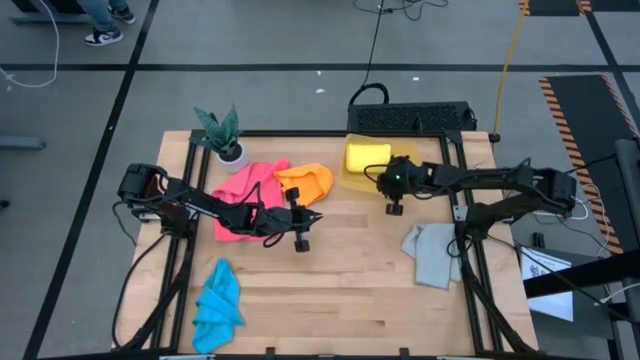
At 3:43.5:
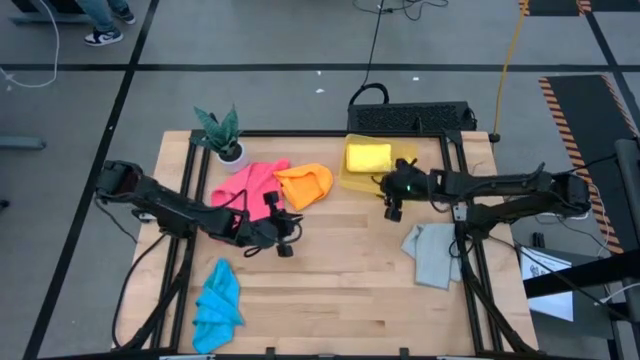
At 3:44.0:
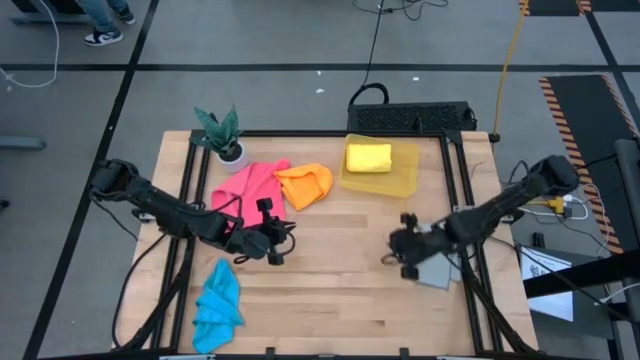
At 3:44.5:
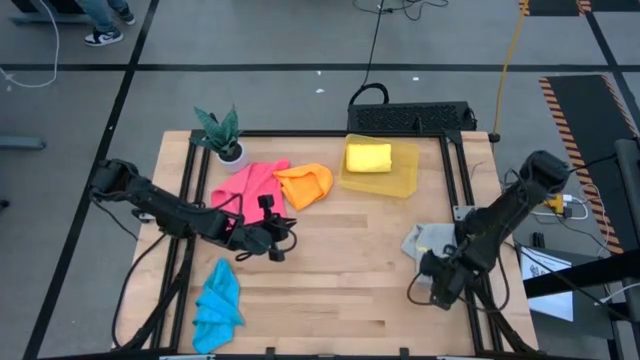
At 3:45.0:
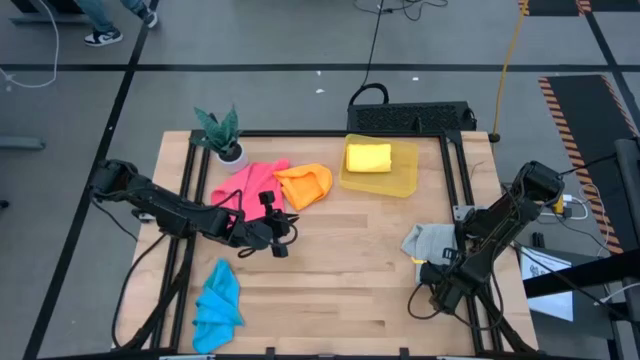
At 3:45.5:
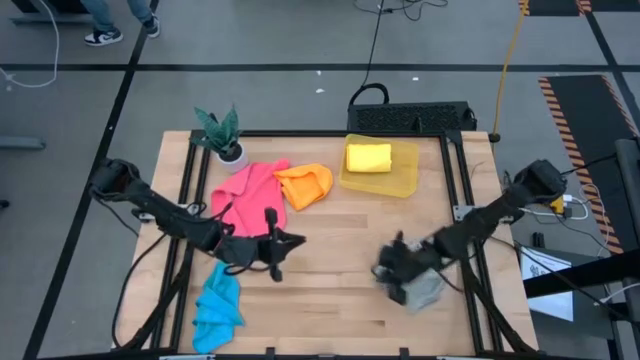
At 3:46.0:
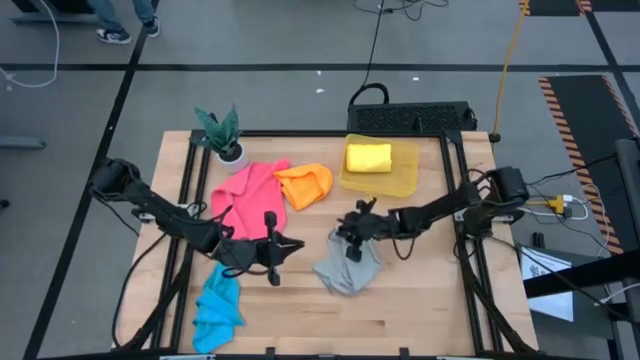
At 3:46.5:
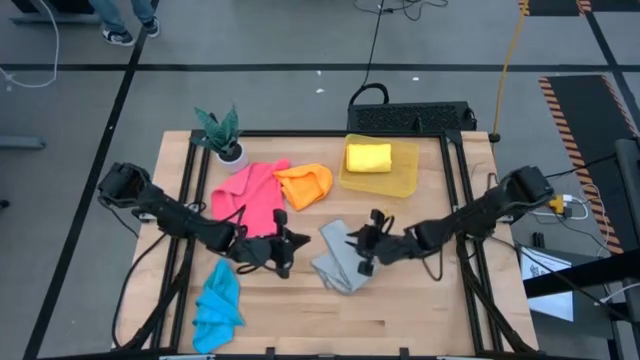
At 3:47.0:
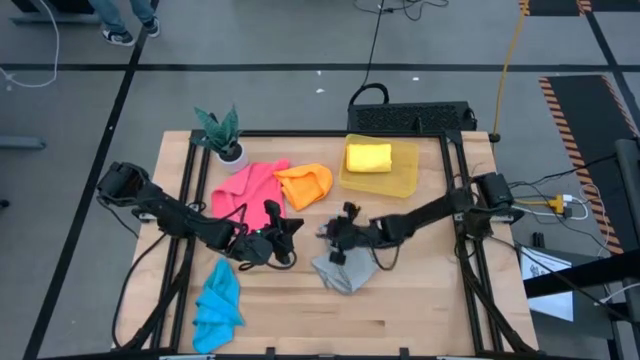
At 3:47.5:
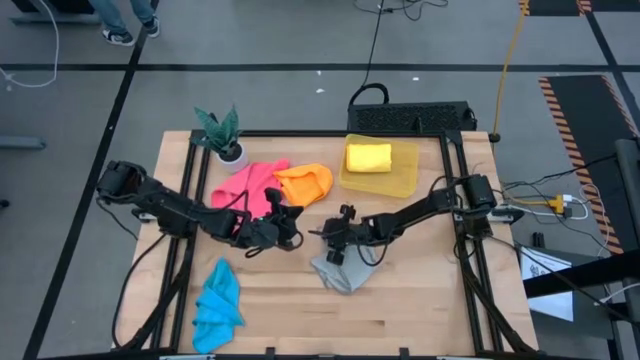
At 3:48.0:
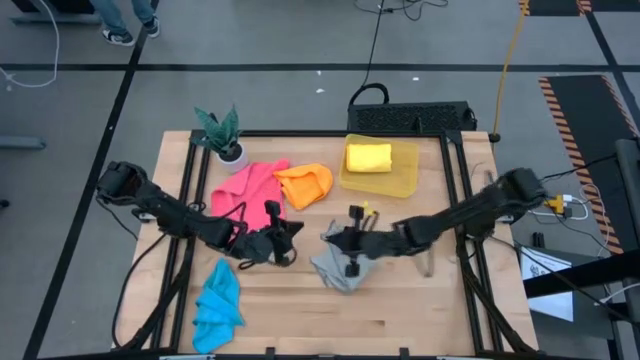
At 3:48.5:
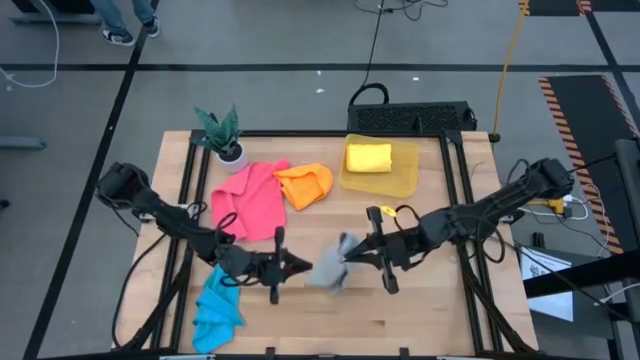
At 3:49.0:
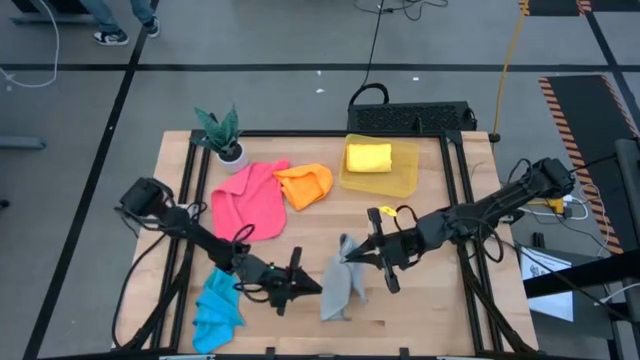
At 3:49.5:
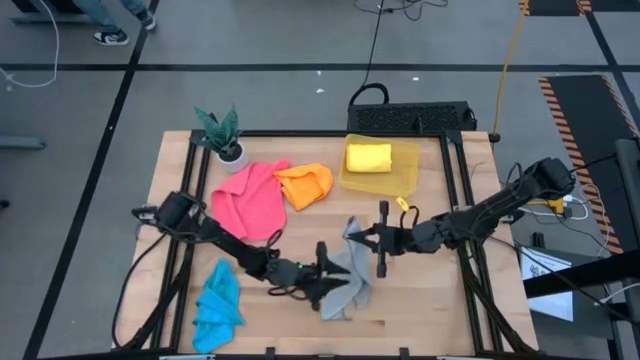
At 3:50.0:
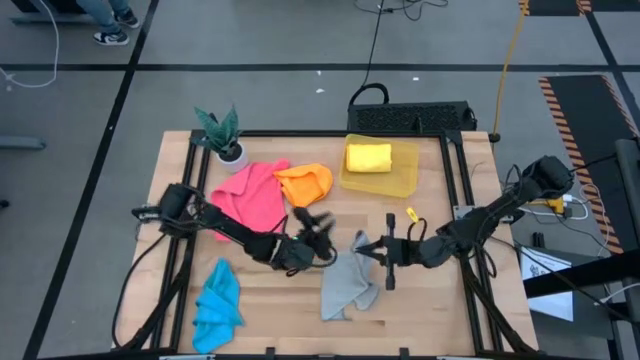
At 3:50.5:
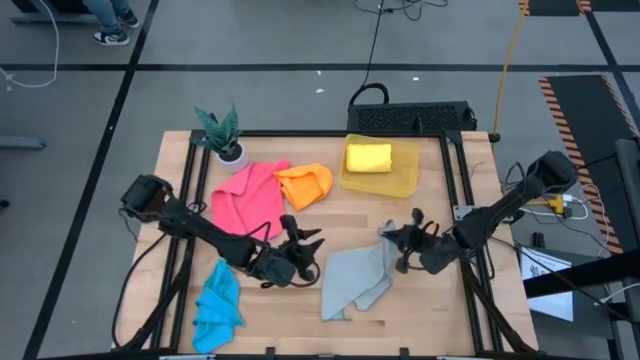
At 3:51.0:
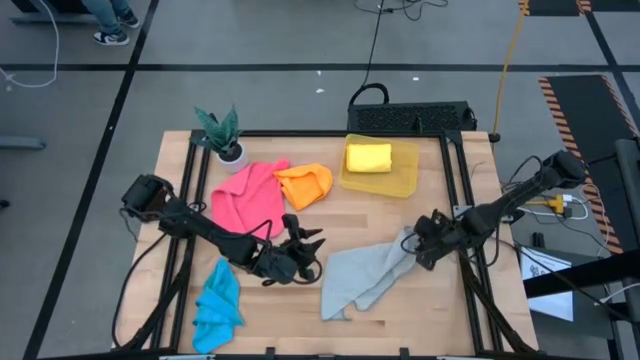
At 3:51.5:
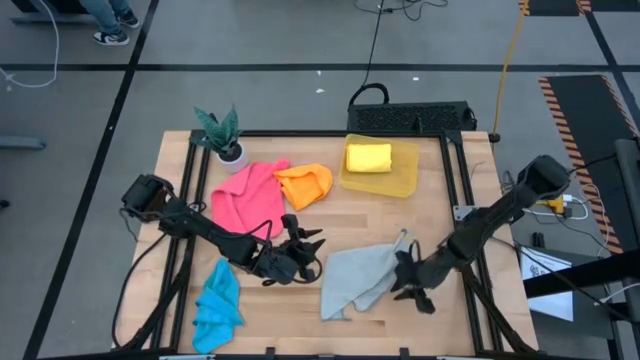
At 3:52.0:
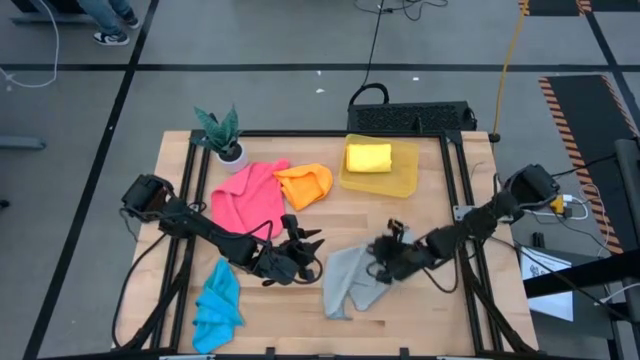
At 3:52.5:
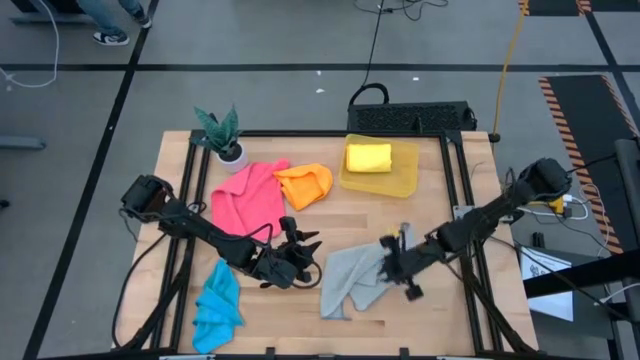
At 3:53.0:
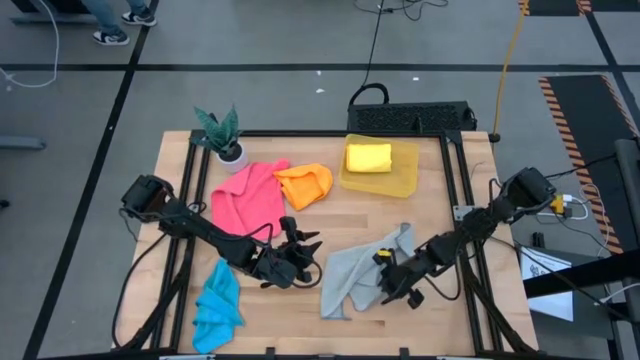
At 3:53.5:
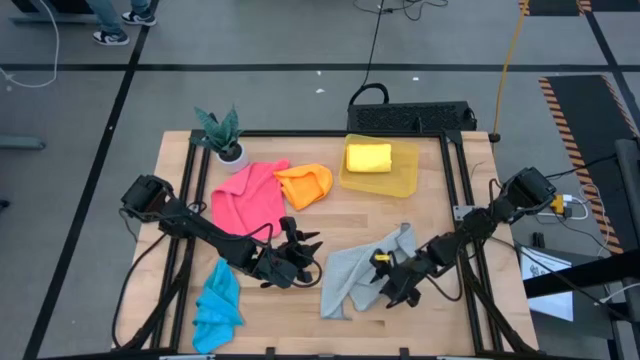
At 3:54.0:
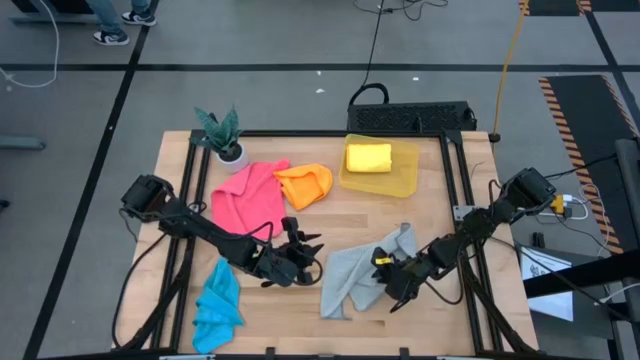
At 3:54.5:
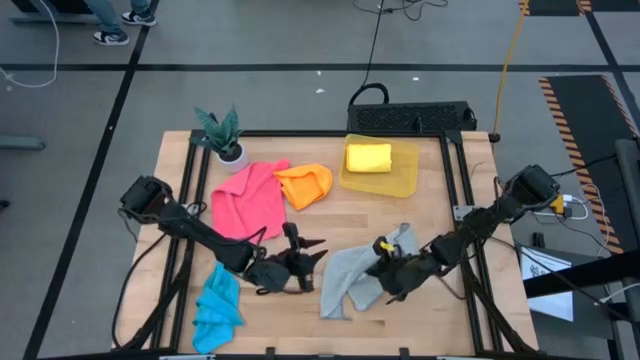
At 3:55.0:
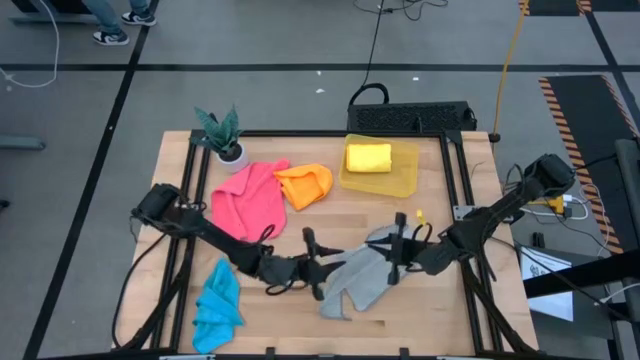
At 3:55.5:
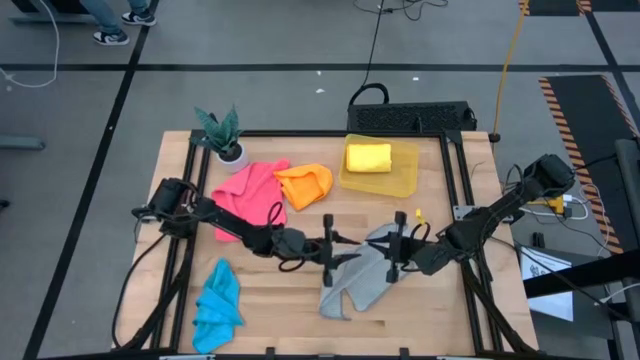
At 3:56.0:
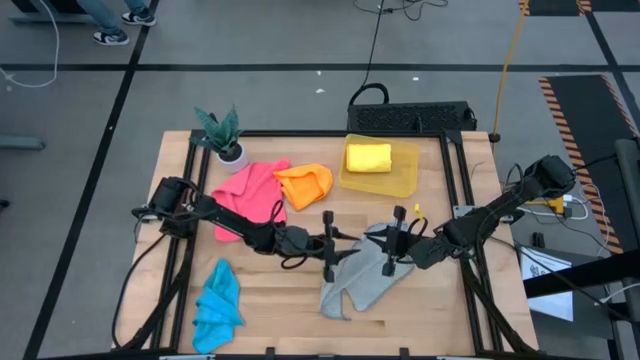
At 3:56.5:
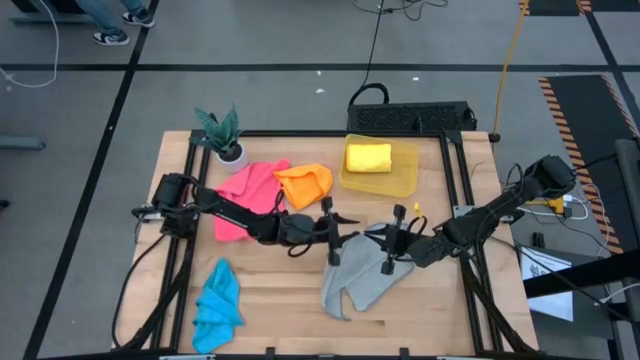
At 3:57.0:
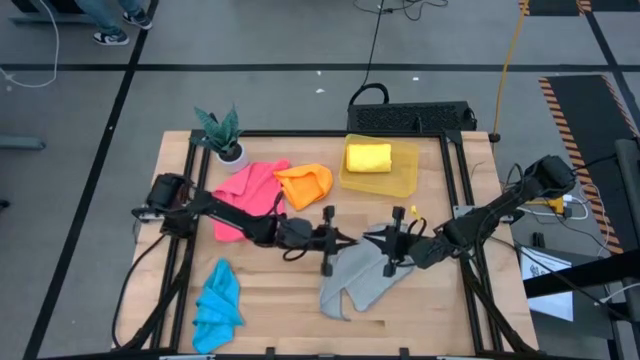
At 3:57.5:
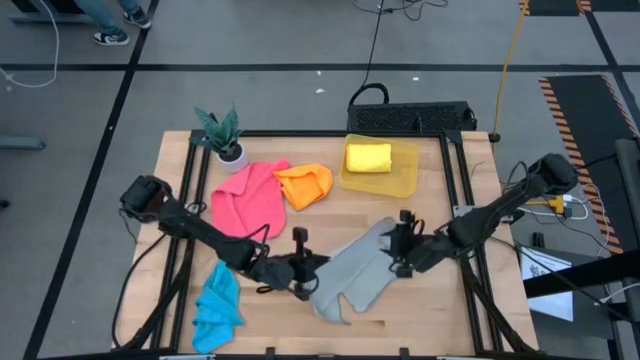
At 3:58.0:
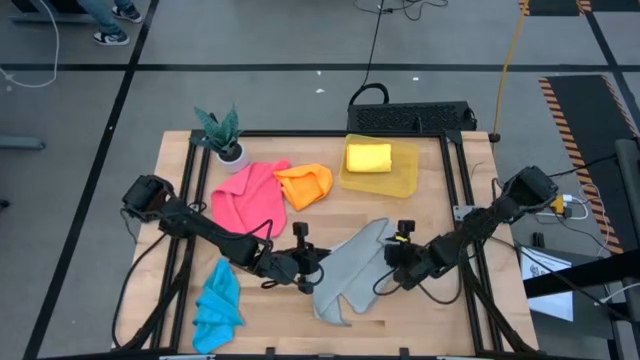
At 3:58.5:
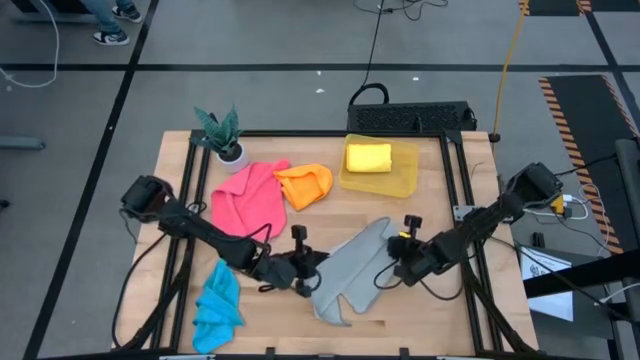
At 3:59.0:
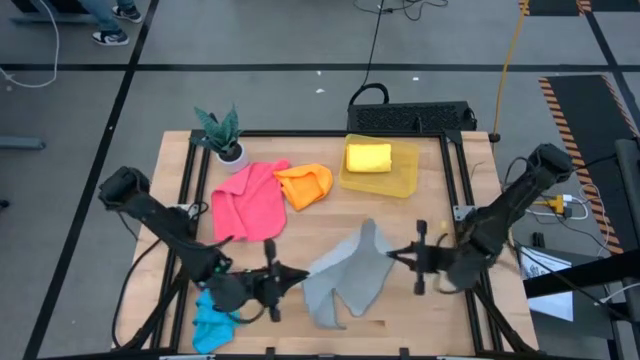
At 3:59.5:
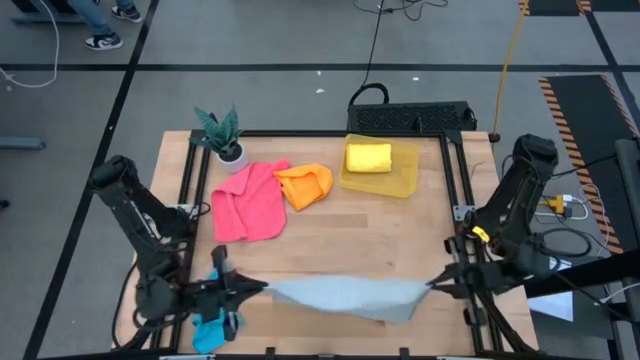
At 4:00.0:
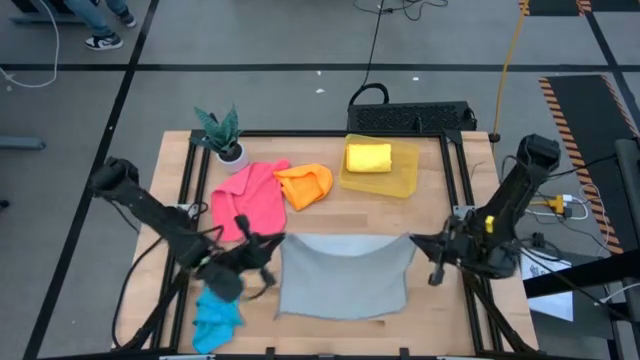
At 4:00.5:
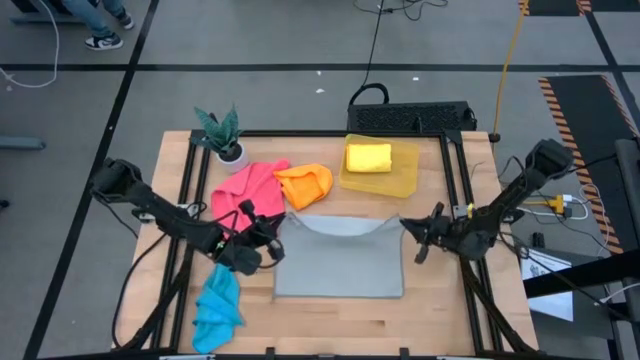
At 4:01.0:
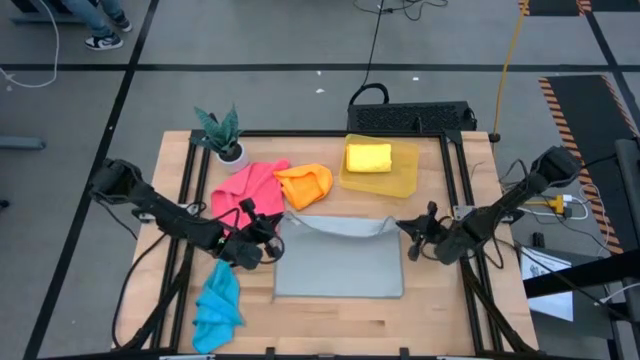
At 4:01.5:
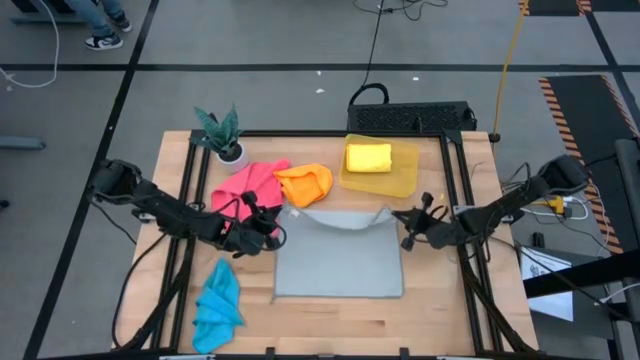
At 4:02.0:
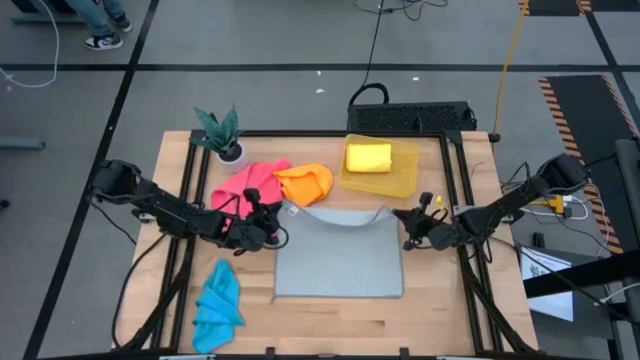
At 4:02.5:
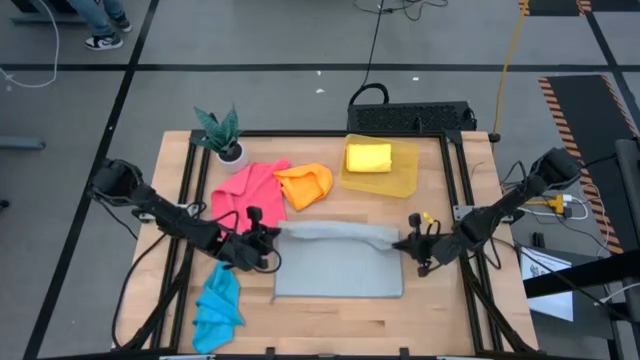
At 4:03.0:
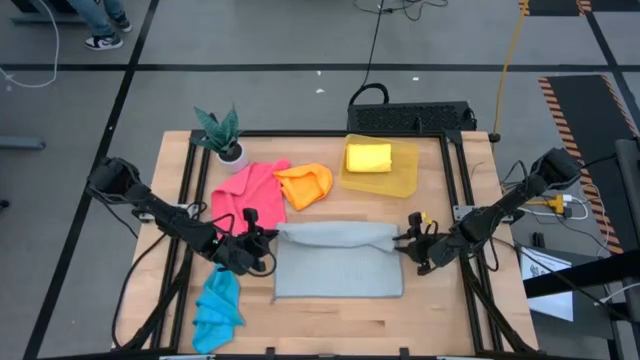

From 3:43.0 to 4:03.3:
Task: Fold microfiber towels
Fold the gray kitchen towel
